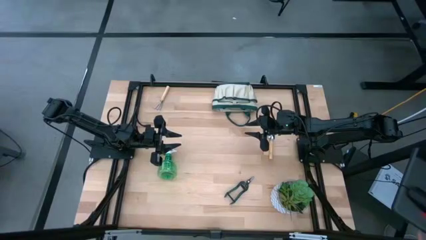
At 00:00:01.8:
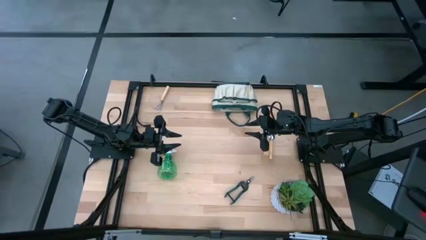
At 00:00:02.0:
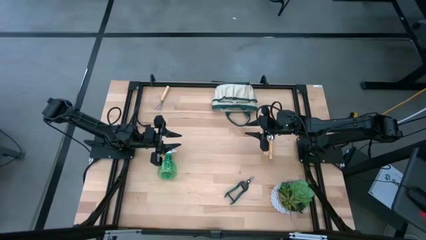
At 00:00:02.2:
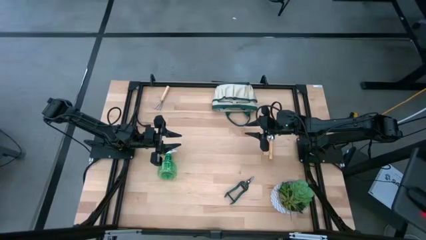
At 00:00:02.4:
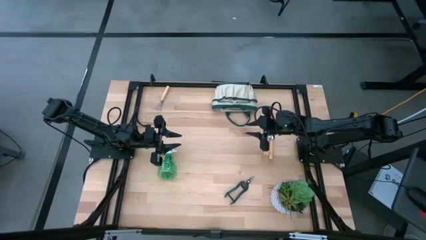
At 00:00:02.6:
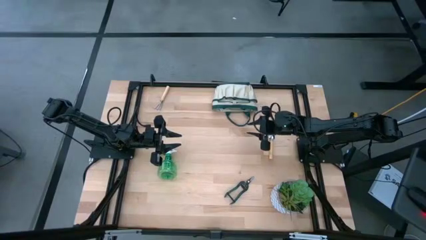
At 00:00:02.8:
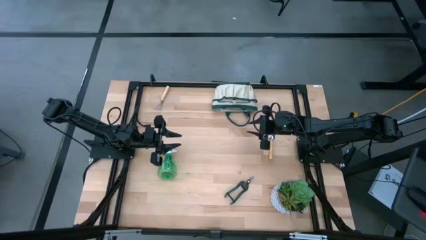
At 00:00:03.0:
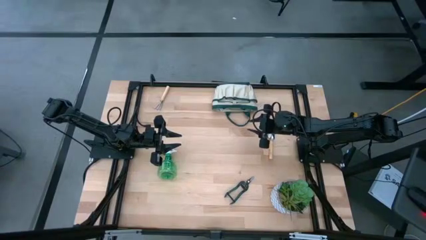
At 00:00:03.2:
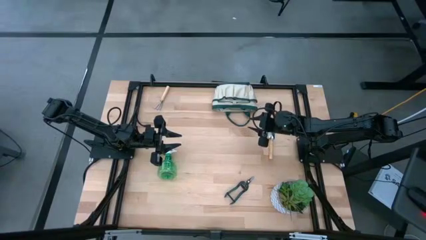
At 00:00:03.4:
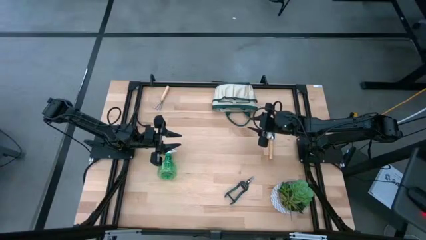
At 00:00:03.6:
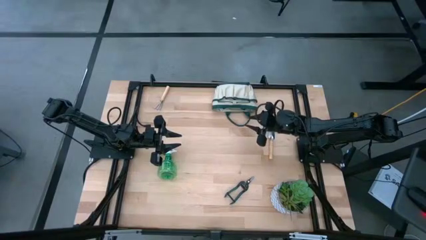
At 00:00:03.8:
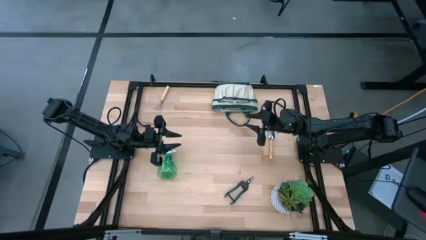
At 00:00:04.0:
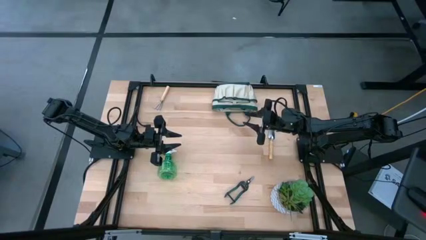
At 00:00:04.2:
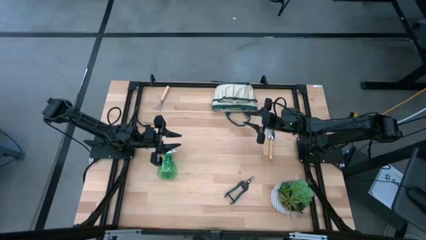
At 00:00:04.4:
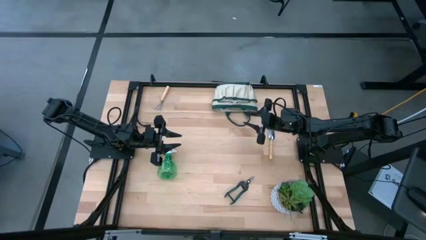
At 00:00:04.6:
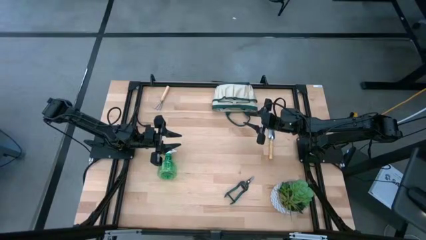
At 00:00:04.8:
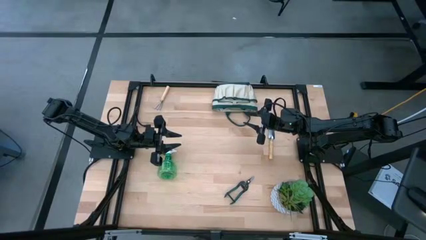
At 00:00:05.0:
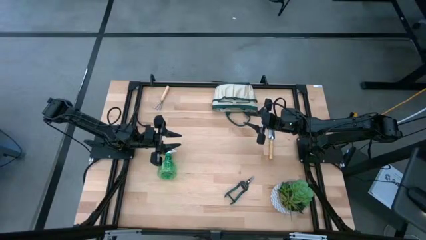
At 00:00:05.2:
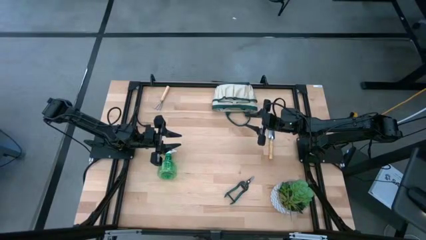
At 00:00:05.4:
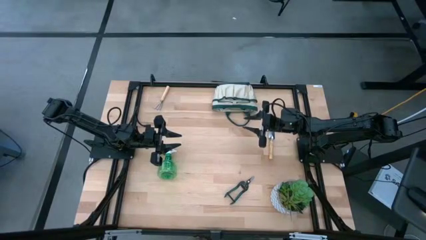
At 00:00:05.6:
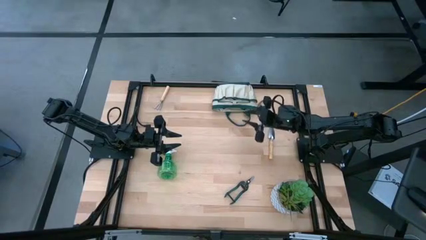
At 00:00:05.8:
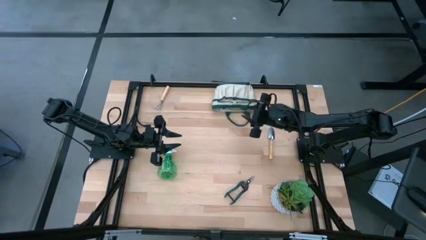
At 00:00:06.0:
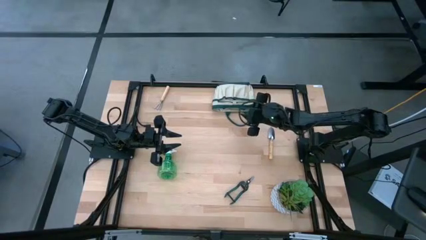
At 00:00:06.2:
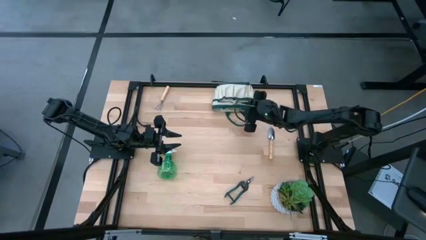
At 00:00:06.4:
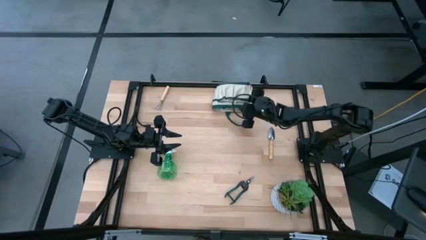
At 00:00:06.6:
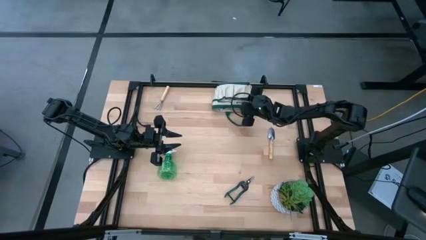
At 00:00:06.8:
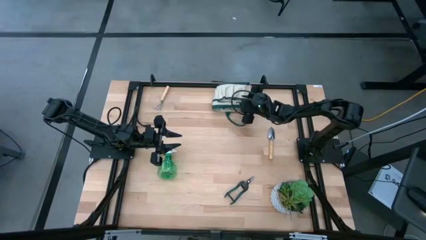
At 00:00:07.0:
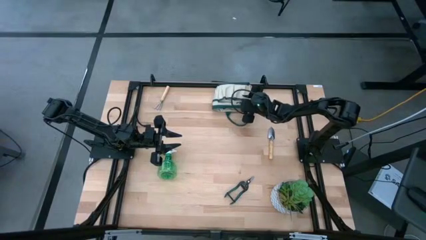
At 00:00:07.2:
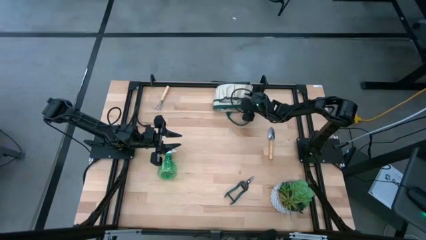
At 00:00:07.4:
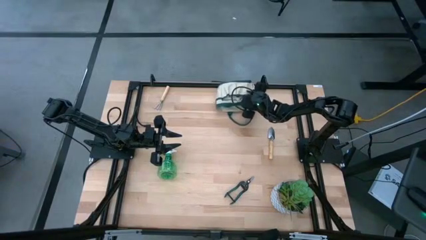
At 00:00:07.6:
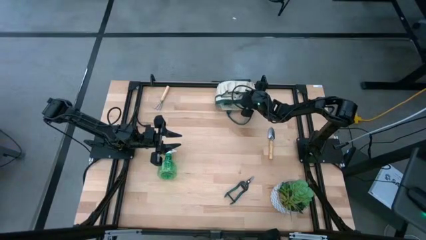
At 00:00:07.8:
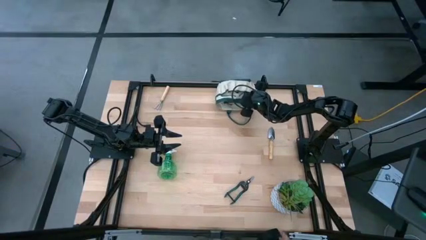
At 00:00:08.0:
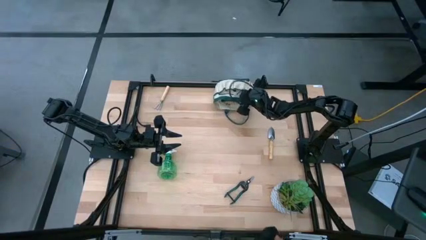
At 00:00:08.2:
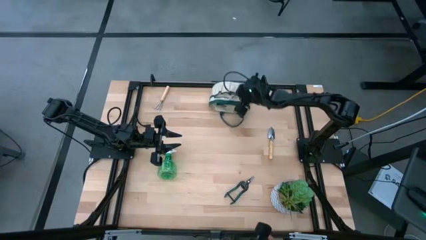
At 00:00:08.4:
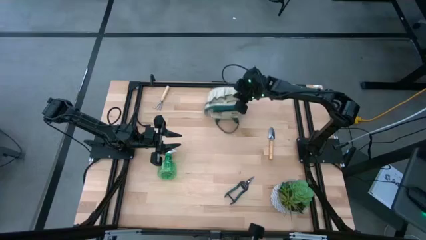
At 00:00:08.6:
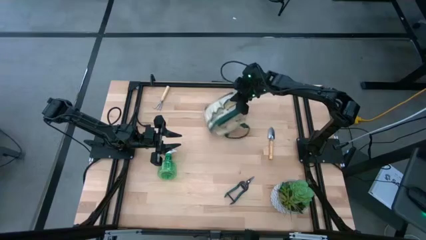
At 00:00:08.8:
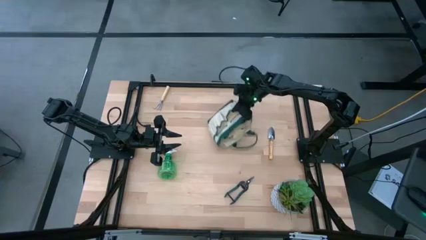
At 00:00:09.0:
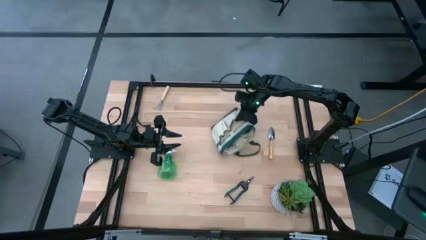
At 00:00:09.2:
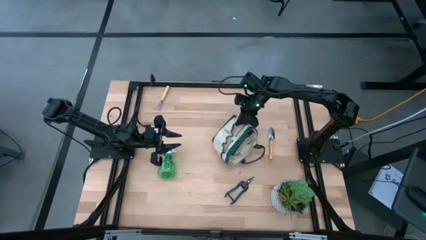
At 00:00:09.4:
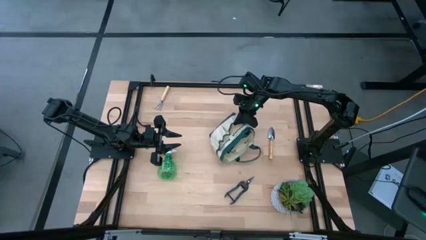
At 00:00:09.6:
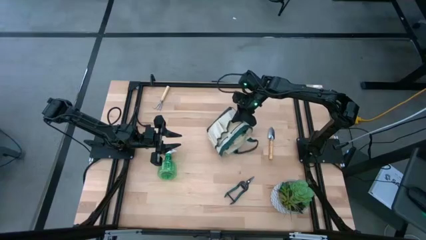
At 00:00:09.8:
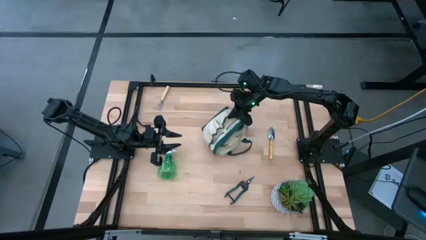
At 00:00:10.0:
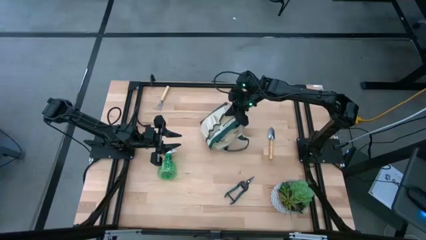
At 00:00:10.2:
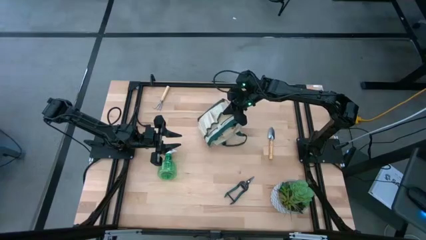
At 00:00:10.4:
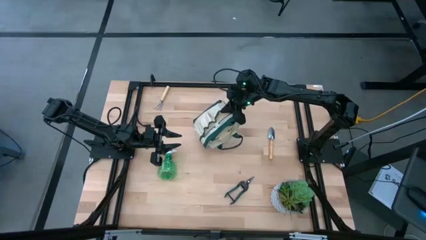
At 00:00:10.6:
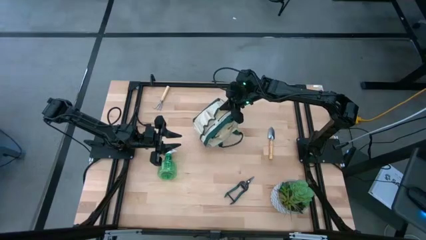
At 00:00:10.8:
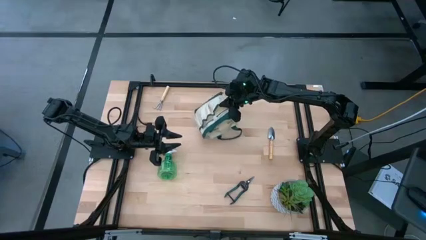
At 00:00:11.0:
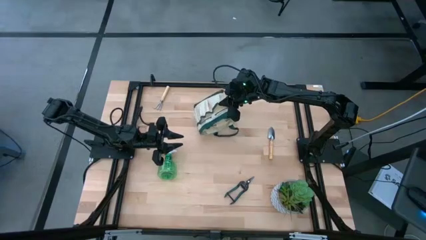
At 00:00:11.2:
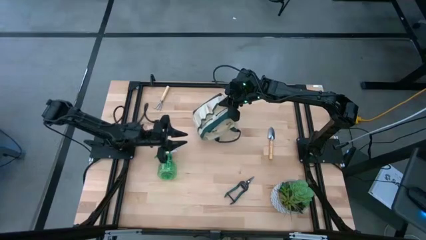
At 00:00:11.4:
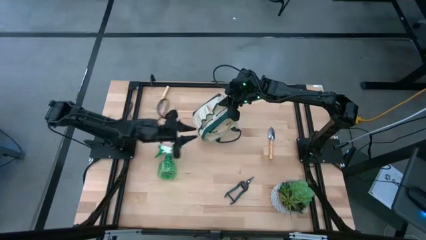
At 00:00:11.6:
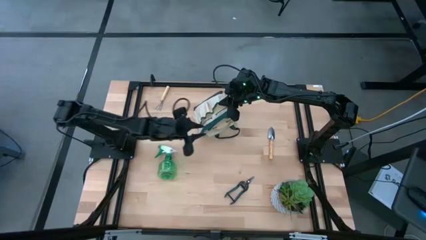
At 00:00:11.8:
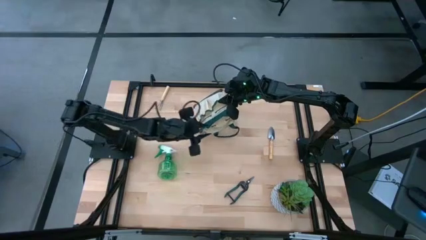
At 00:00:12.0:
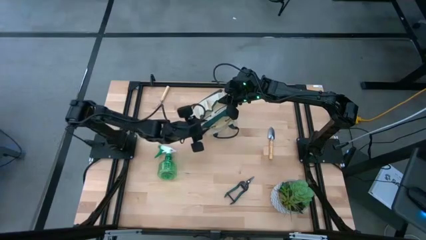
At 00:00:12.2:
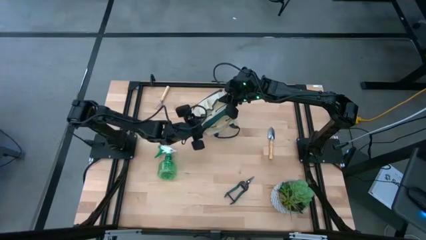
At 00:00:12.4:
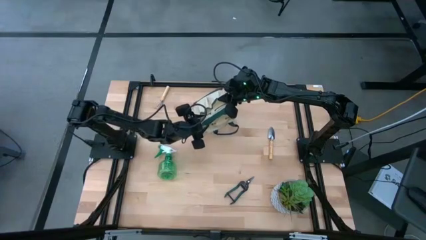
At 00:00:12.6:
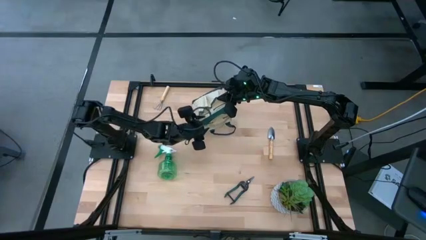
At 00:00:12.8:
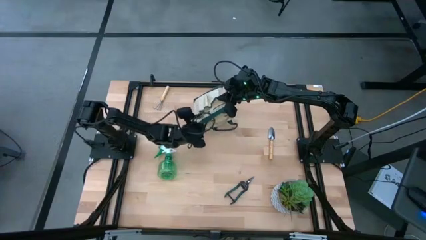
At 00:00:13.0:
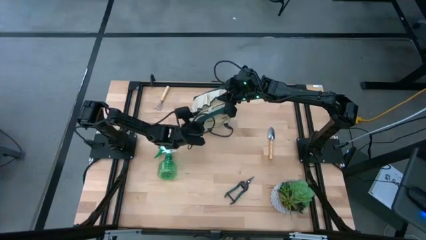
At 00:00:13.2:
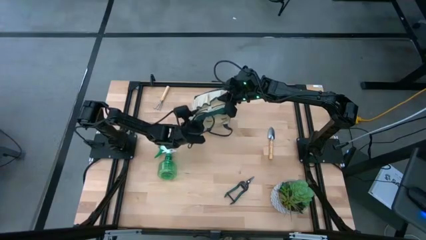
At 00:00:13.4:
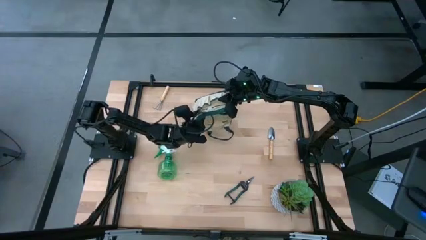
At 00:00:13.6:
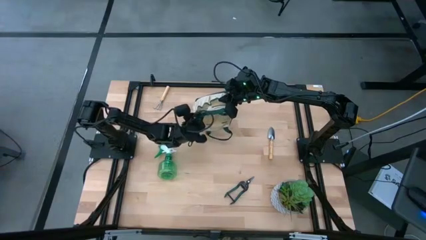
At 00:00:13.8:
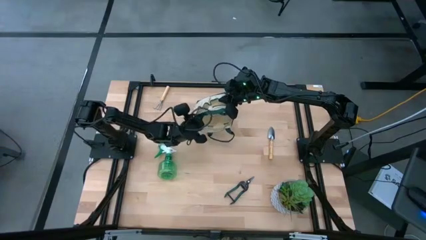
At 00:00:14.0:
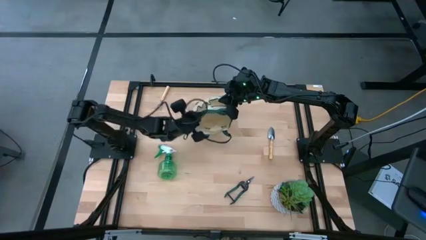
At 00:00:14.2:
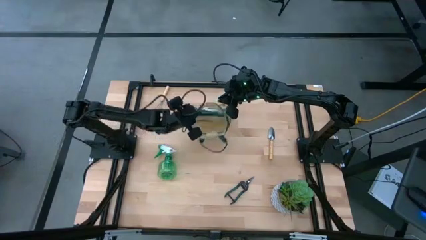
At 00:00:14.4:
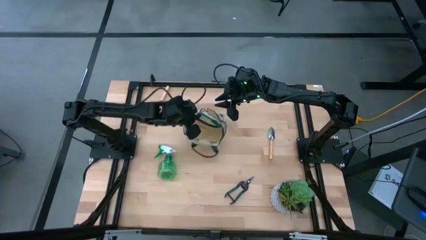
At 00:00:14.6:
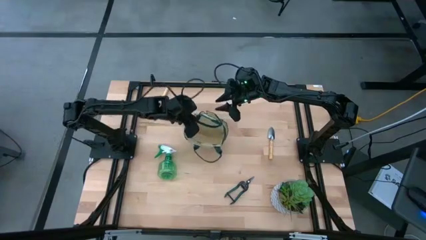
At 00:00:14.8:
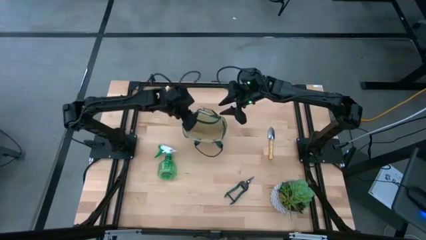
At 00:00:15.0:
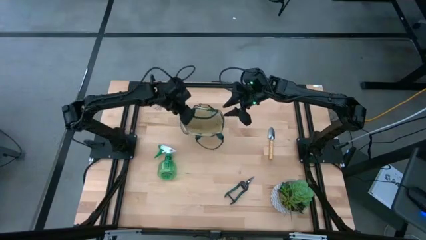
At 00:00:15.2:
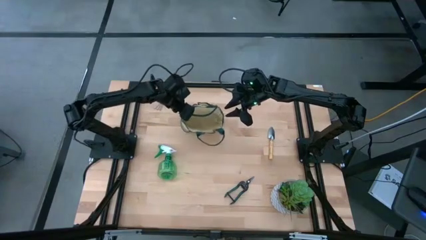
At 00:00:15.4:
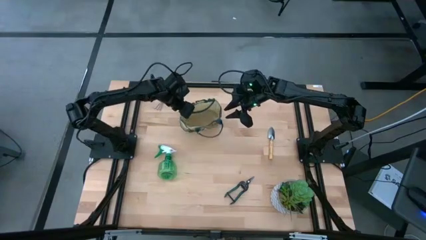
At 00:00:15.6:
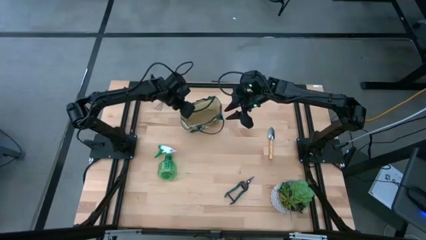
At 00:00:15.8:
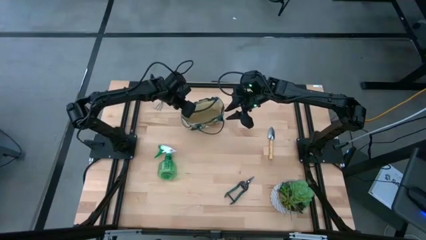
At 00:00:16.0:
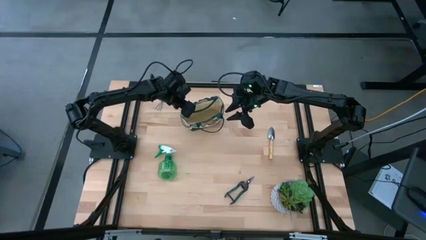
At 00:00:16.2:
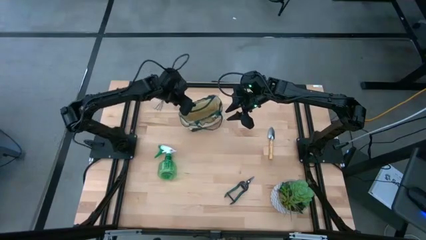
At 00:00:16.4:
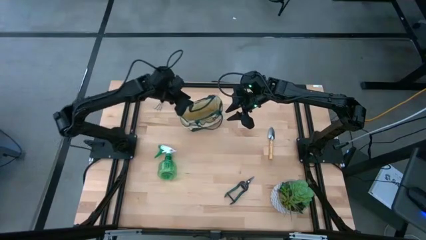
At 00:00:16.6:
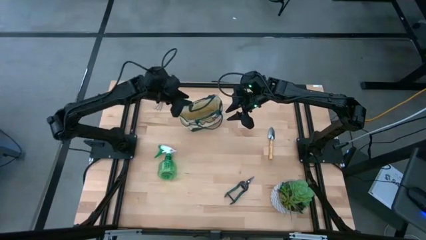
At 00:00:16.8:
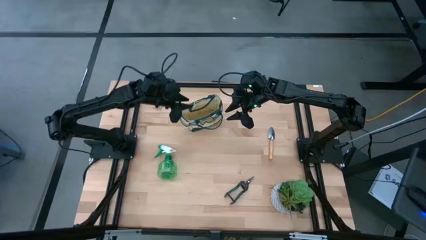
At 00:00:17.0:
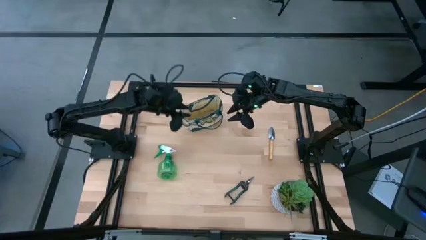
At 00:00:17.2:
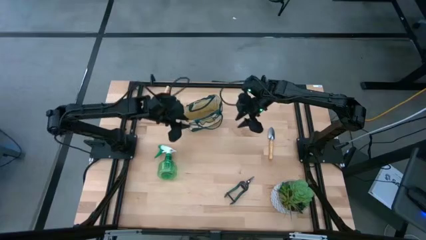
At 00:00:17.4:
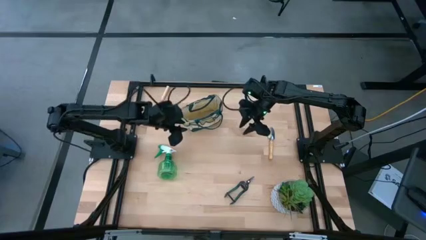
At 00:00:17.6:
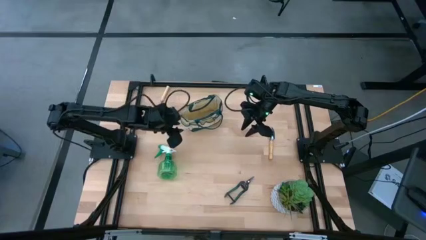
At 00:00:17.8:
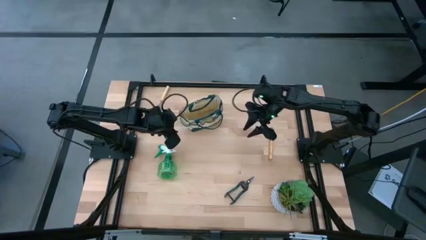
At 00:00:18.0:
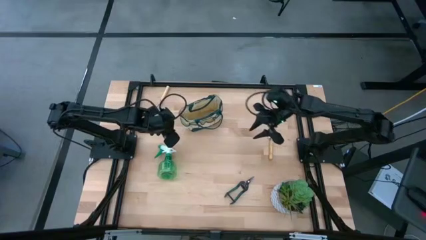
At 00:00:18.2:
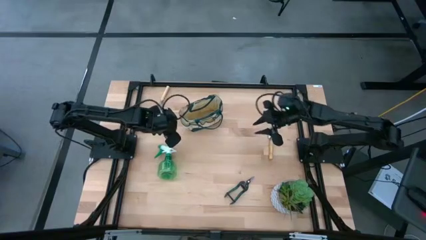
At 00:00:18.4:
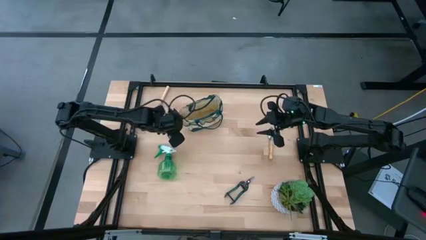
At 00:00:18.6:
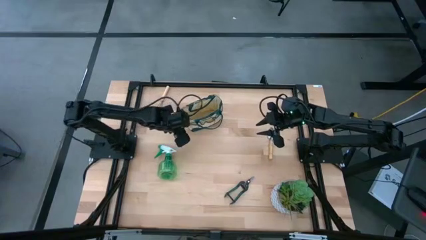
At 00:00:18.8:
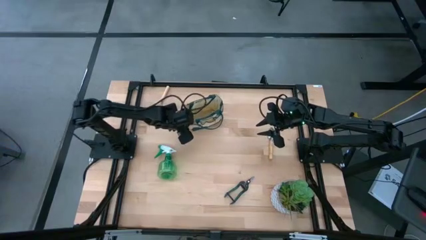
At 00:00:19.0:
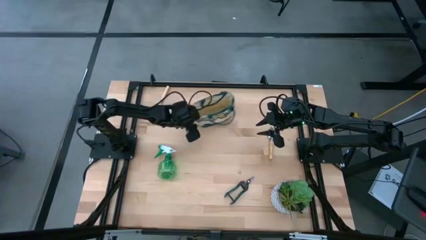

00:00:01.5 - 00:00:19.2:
Task: Pick & Place Garden tools in Gardening bag
Adjust the green gardening bag
